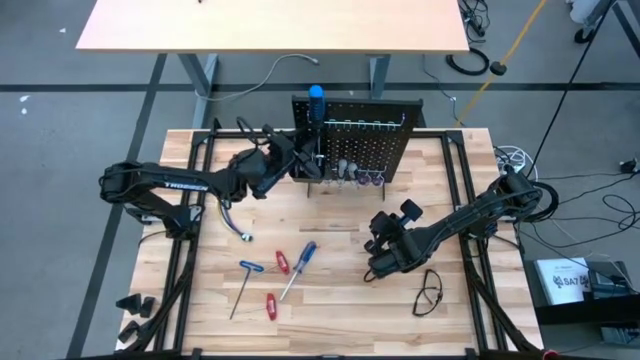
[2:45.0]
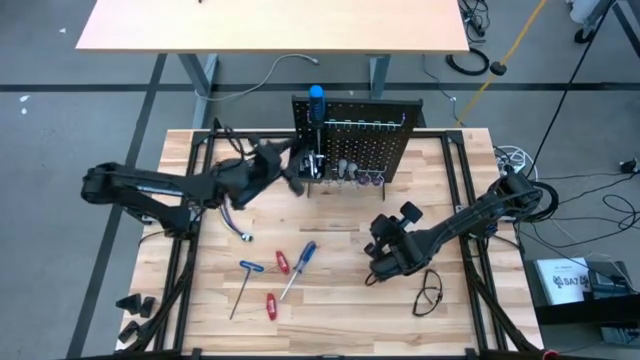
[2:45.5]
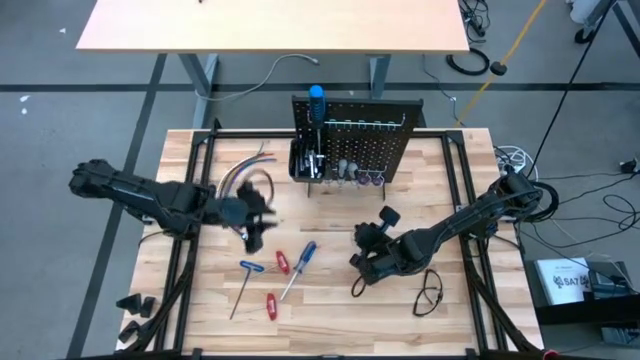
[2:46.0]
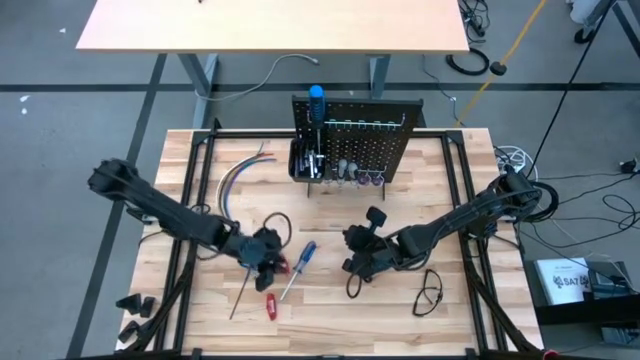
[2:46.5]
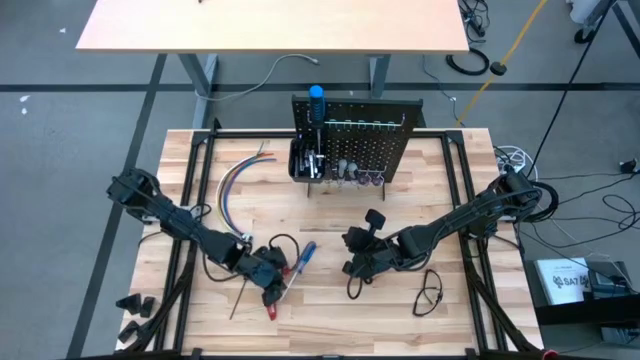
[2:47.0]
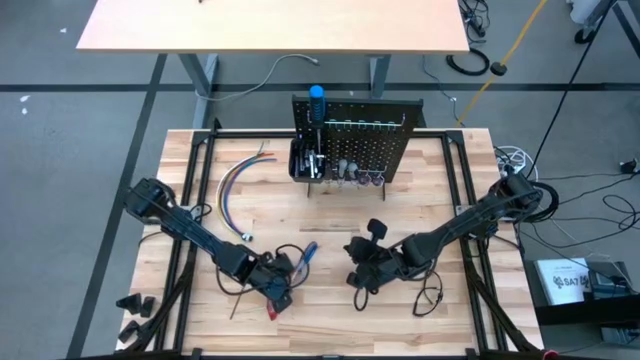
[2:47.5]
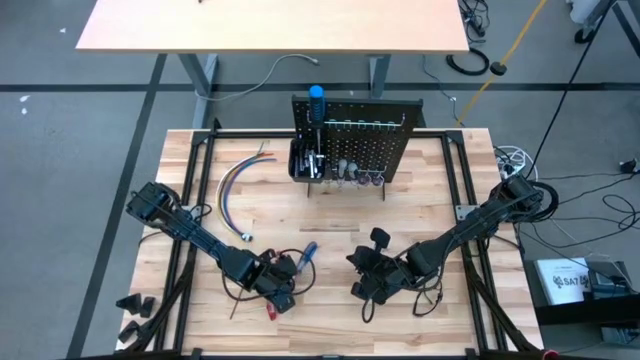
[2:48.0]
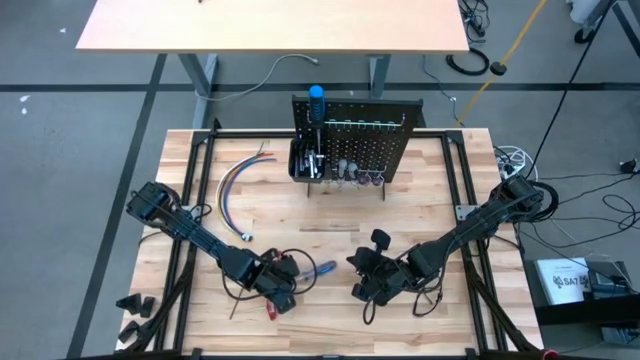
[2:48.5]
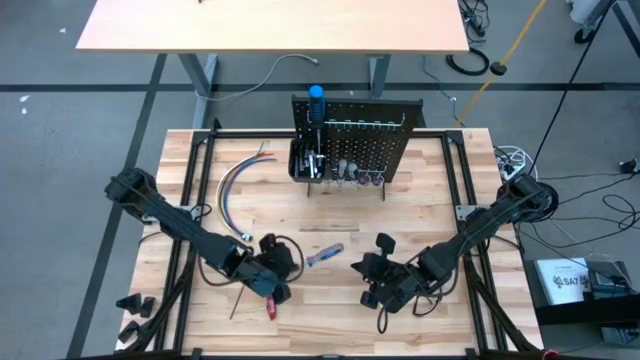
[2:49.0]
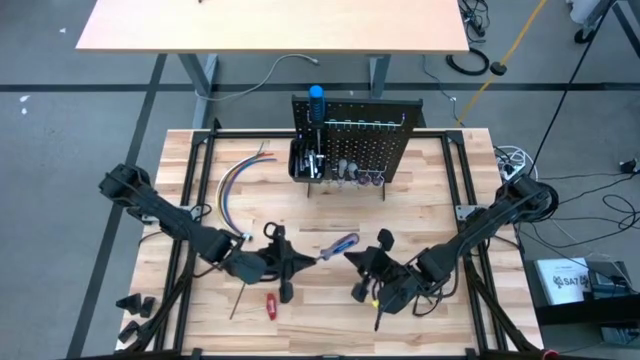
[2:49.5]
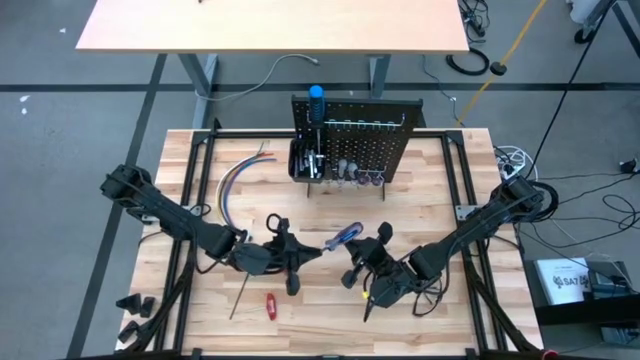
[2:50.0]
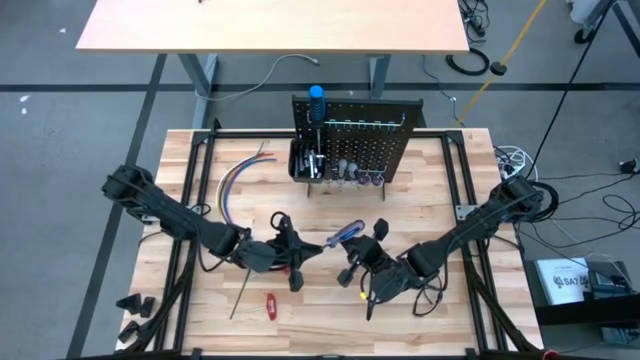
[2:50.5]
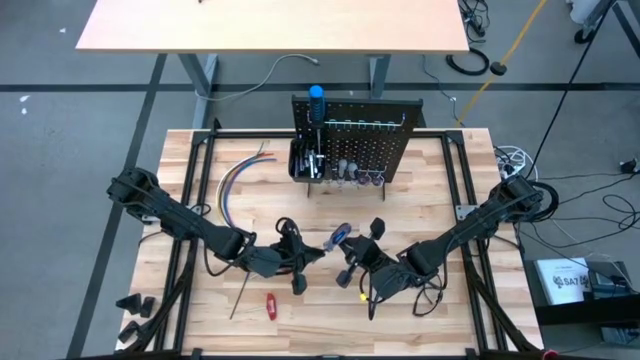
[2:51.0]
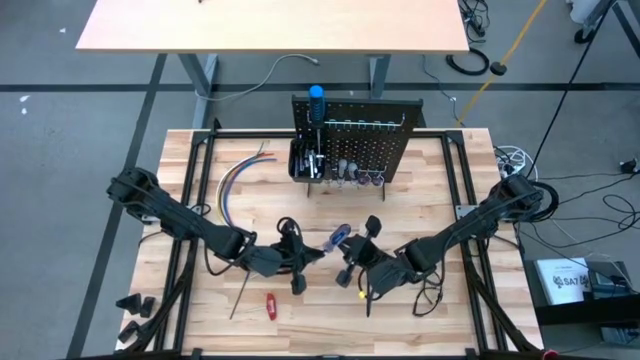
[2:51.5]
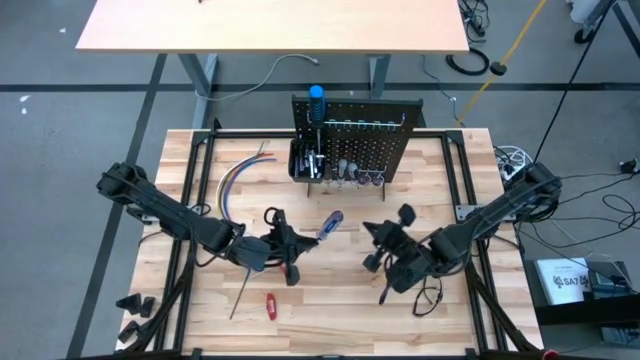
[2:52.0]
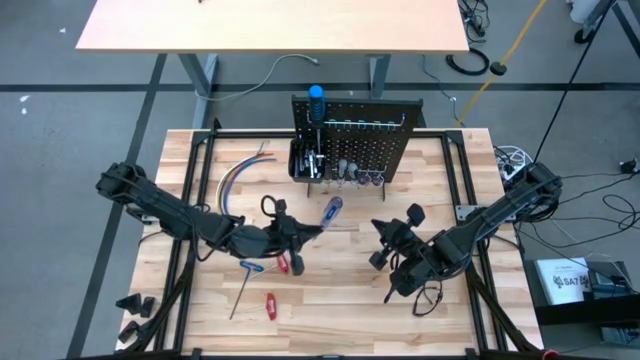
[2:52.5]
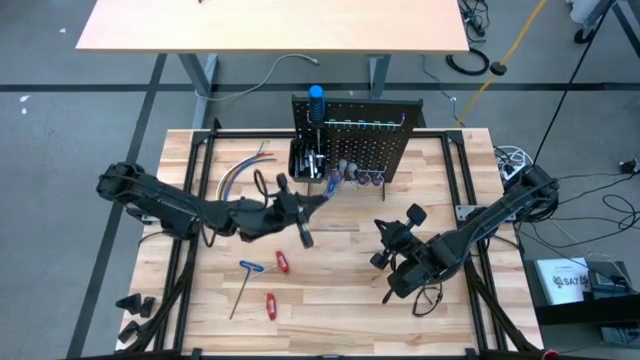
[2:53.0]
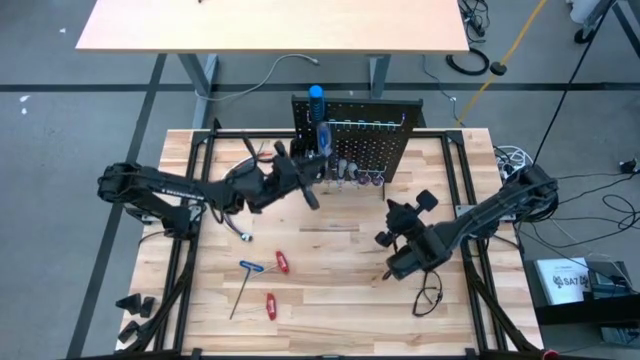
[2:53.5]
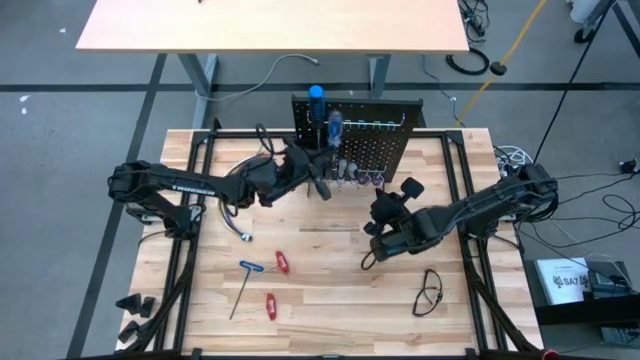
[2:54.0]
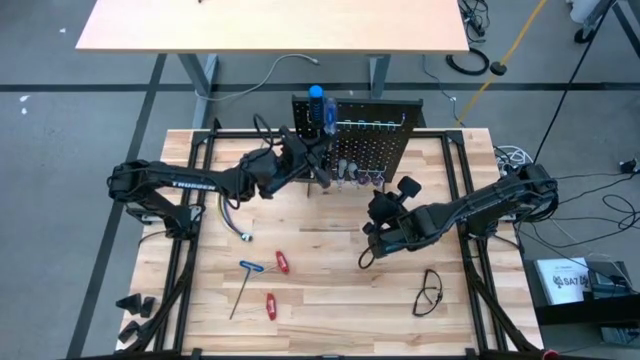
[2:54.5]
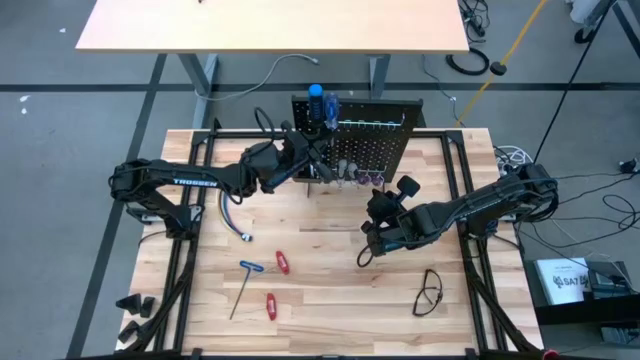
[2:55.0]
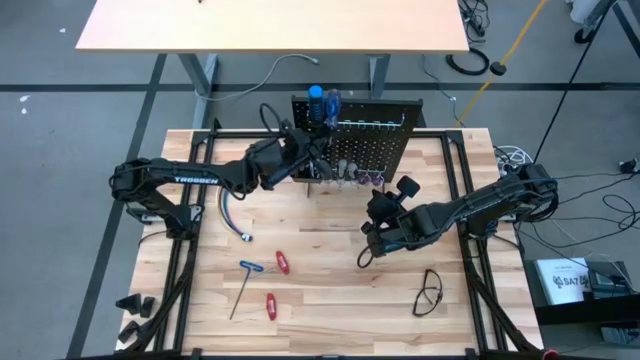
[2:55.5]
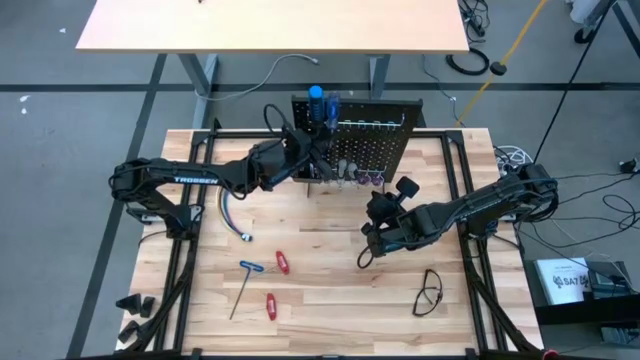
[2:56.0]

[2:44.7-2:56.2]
Task: Hang tools onto peg board
Hang the blue screwdriver on the peg board

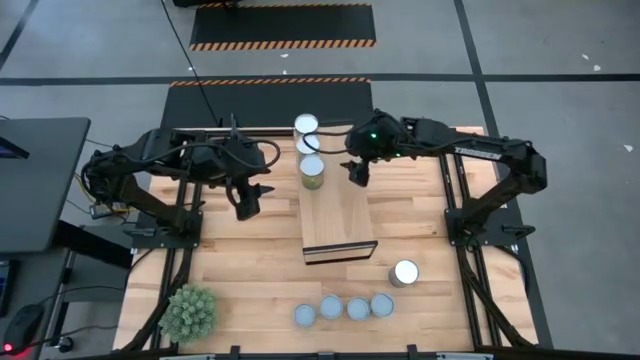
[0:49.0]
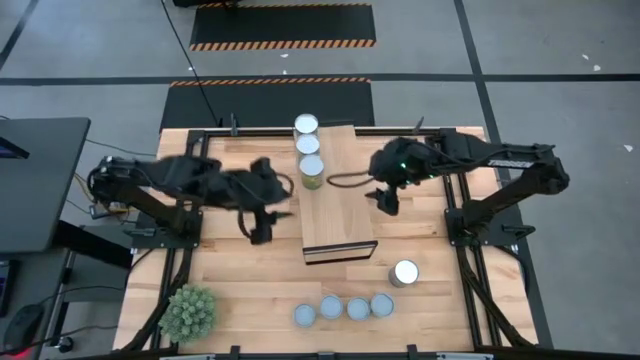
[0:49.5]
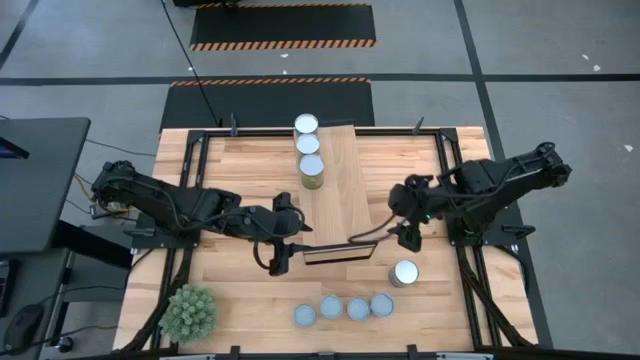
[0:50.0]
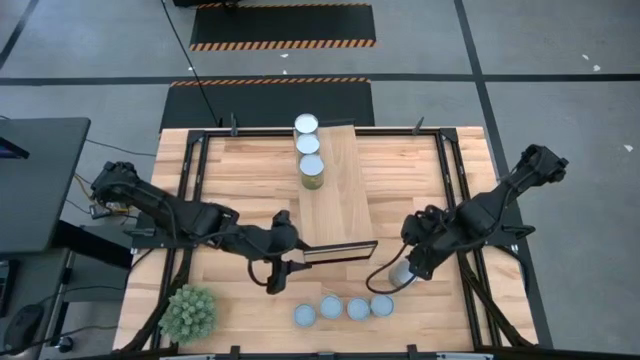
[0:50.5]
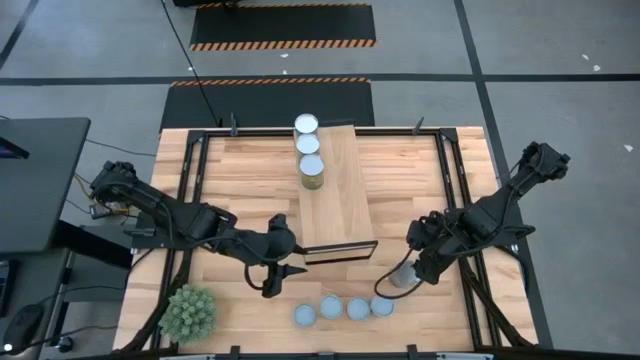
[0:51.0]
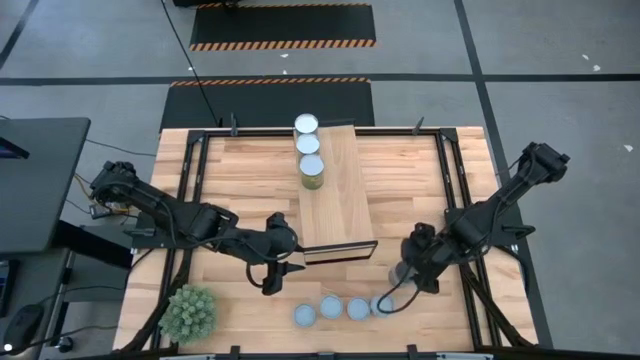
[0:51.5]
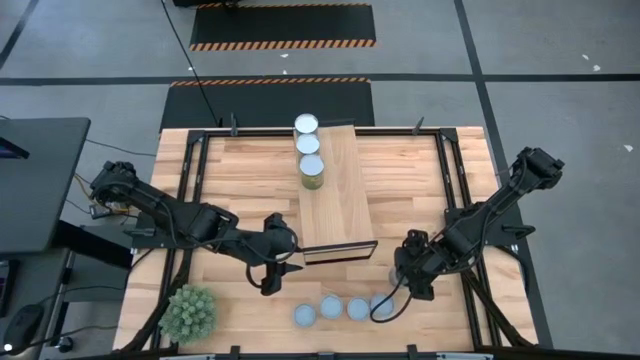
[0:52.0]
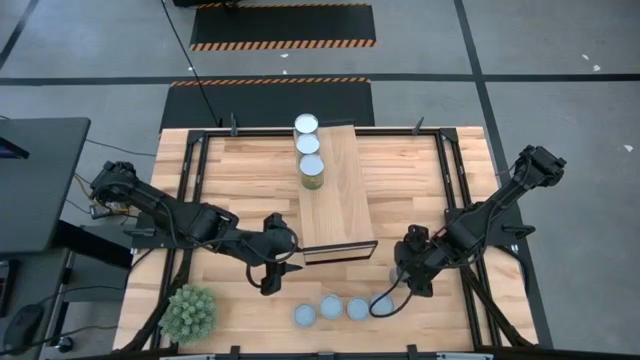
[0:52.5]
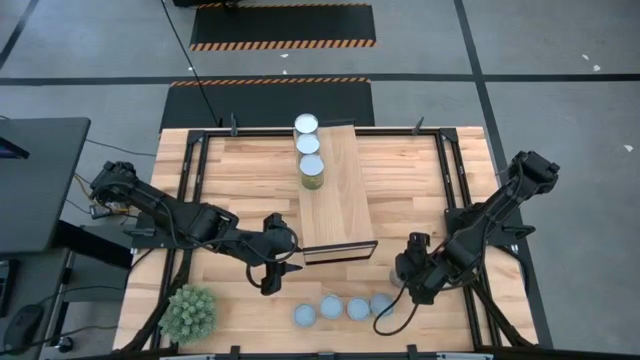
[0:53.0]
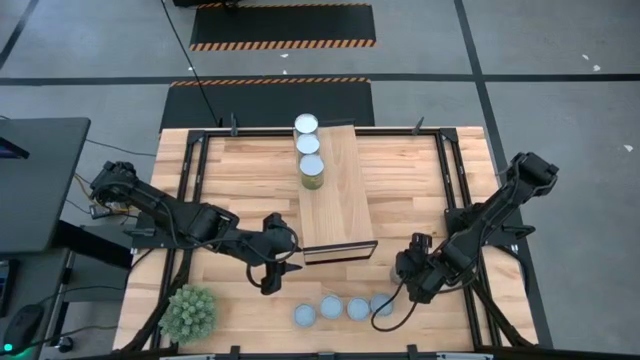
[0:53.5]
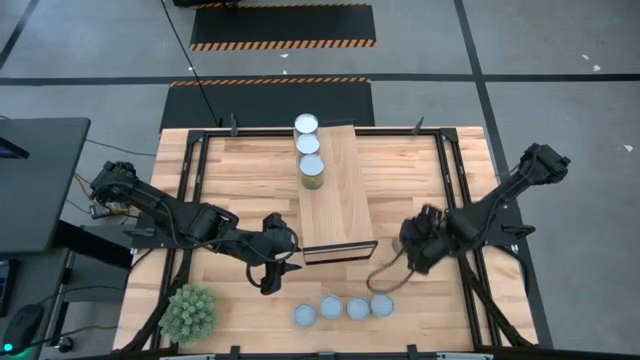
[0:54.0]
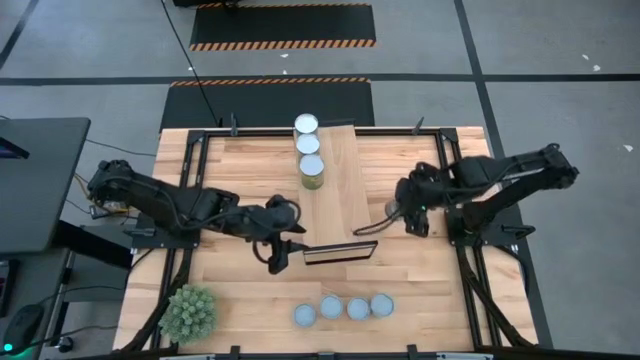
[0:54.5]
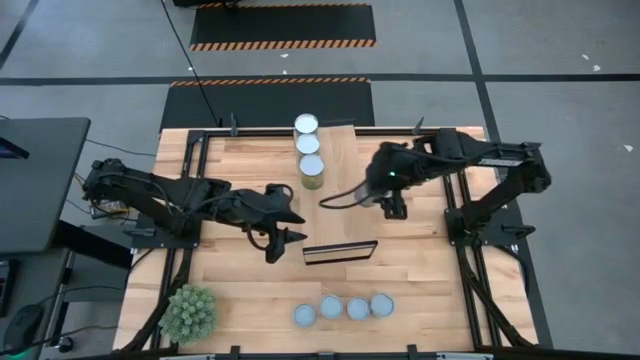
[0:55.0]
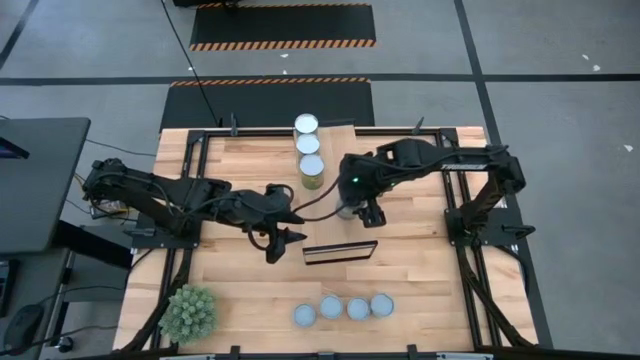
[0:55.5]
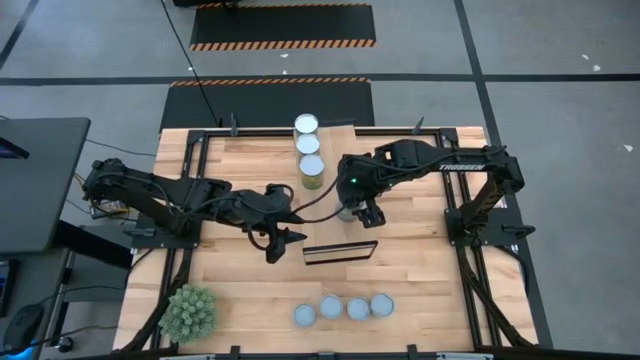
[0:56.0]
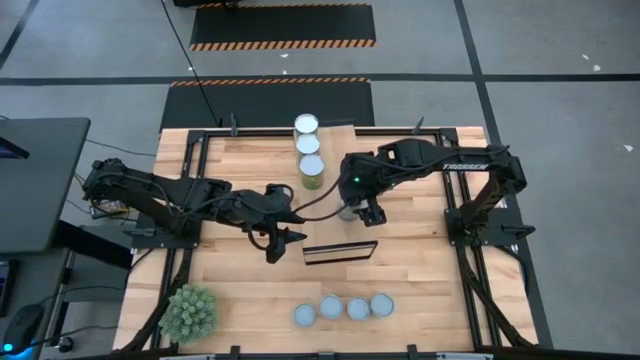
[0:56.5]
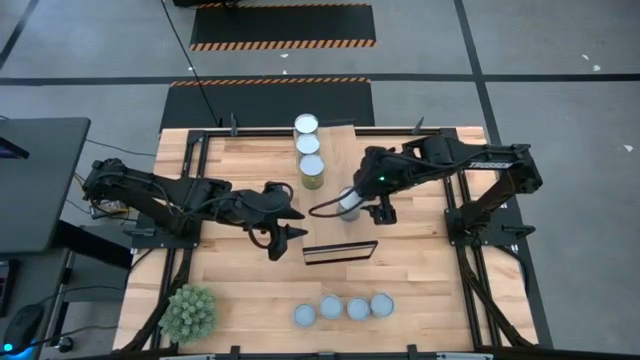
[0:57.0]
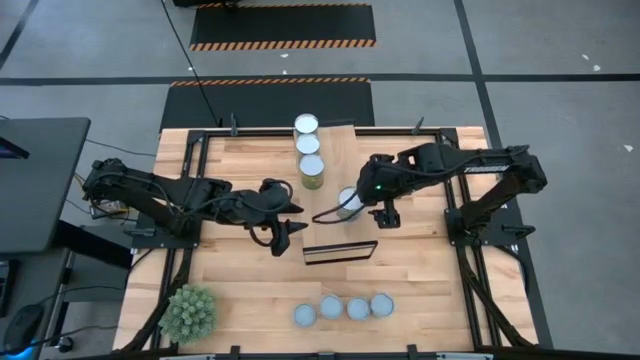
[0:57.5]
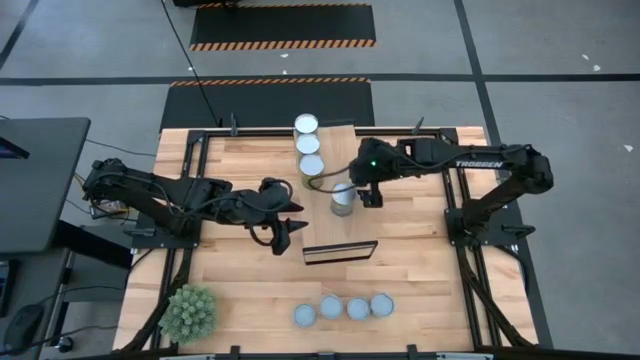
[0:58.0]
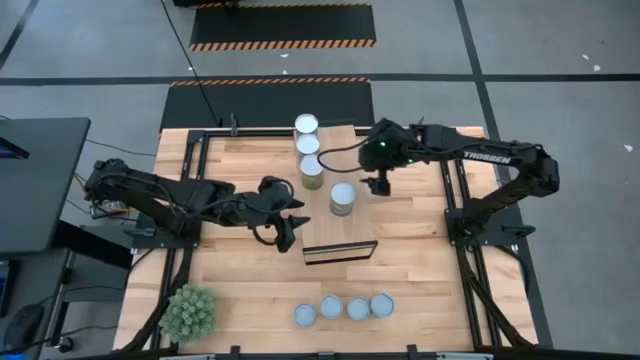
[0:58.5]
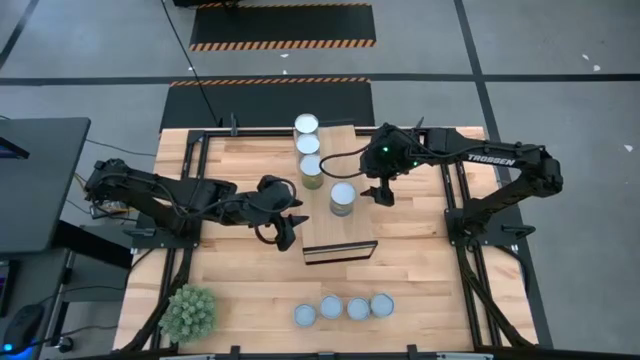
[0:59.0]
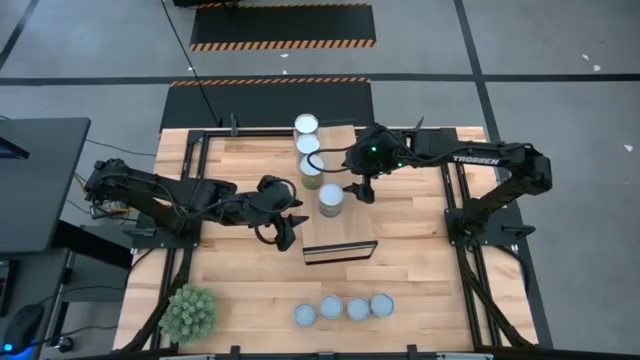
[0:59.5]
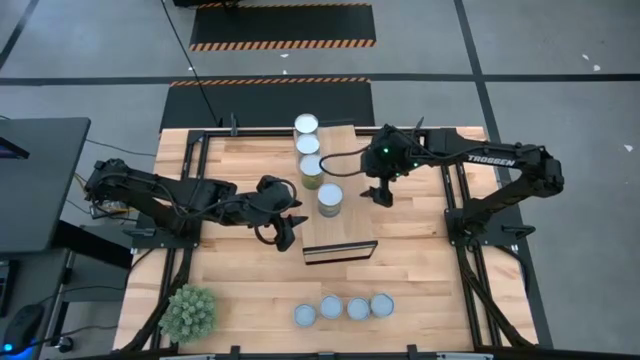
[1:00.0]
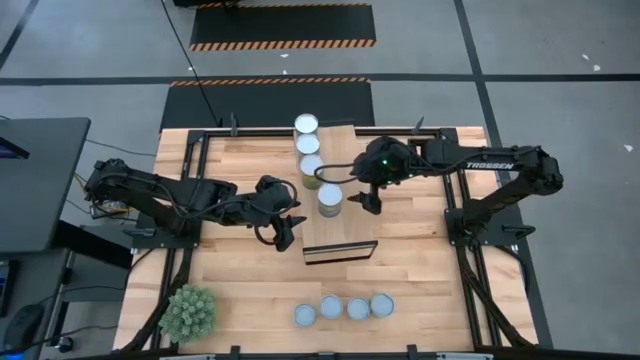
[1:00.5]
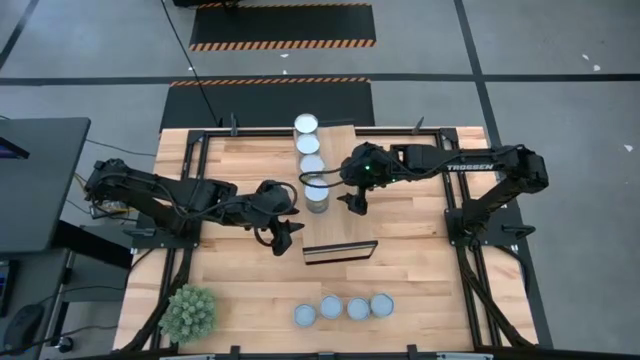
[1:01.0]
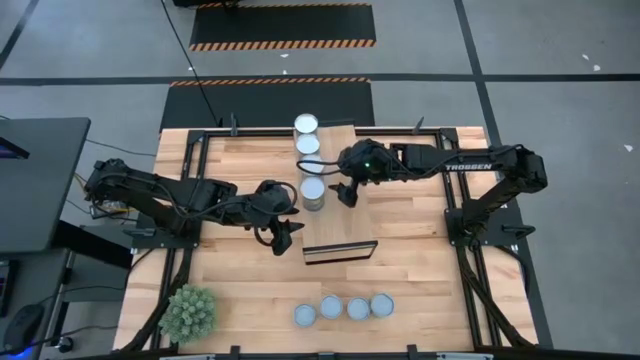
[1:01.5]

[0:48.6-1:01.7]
Task: Pick and place cans onto a shelf
Put the large canned peas on the shelf
